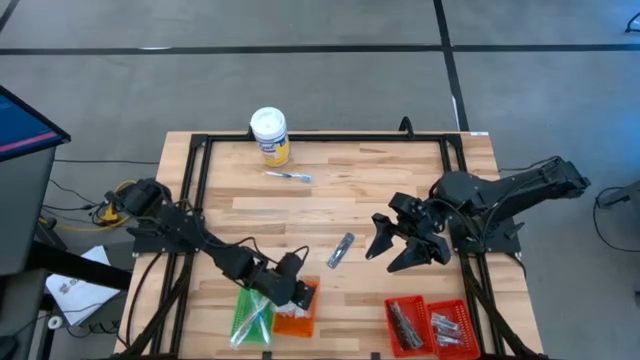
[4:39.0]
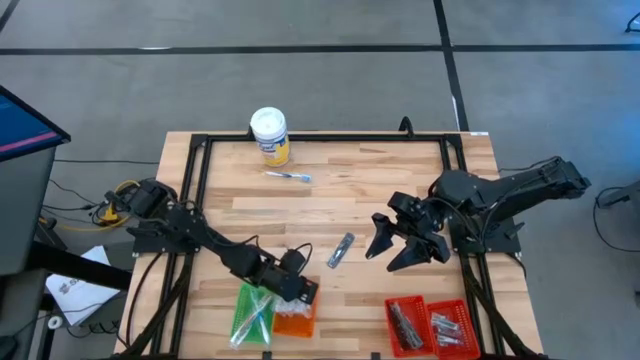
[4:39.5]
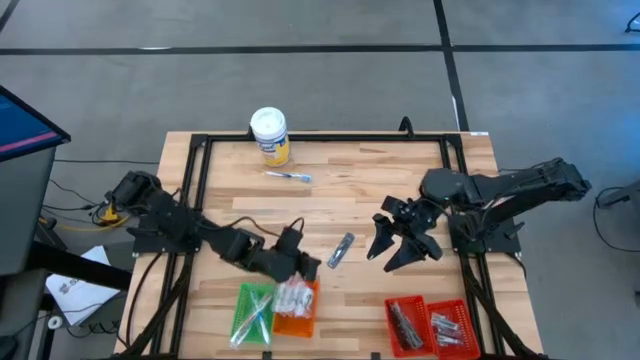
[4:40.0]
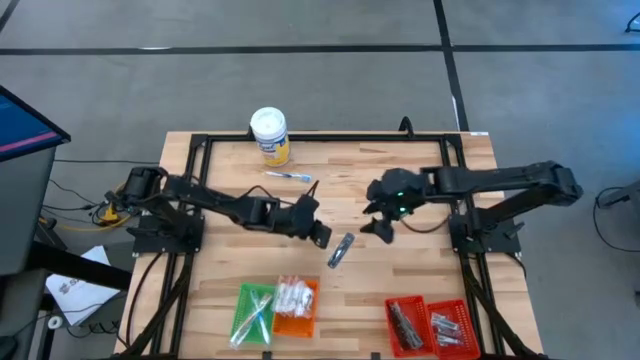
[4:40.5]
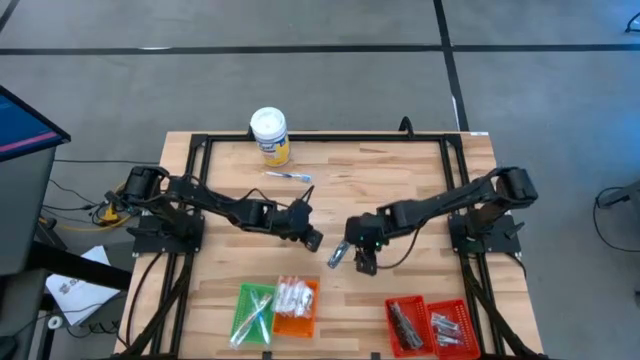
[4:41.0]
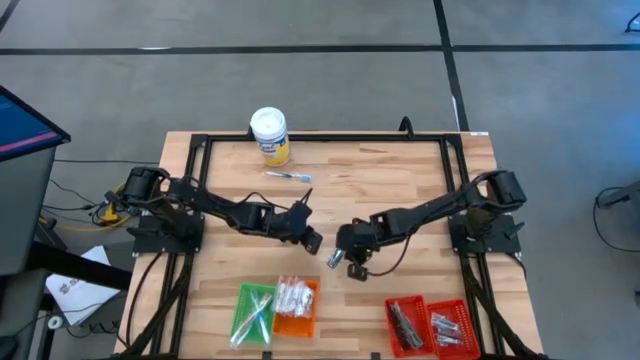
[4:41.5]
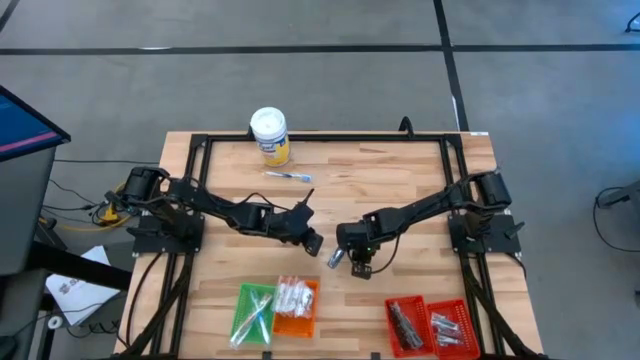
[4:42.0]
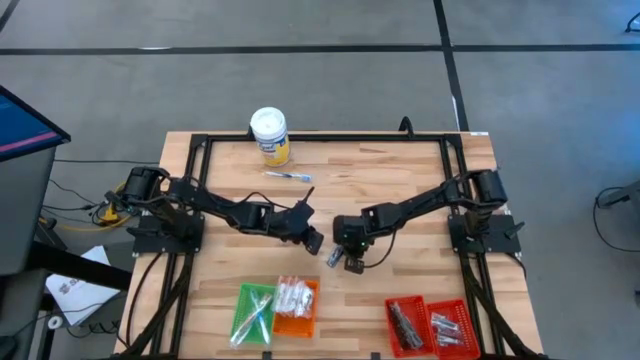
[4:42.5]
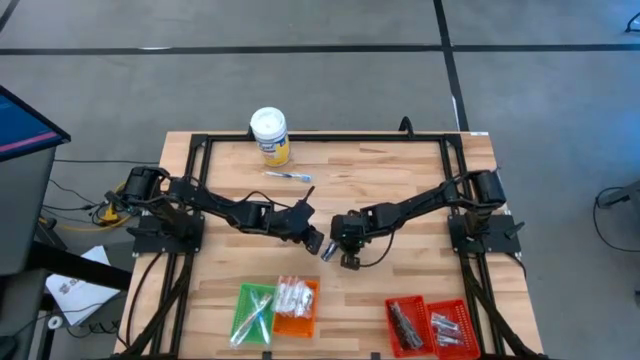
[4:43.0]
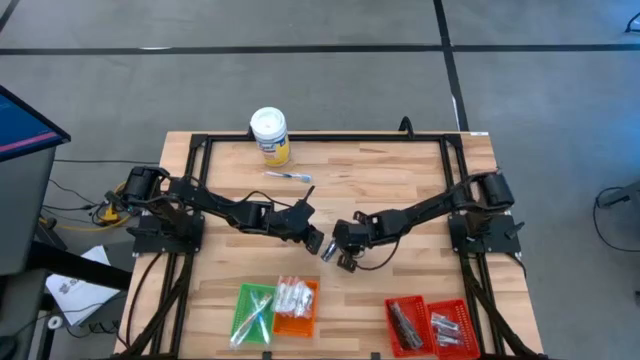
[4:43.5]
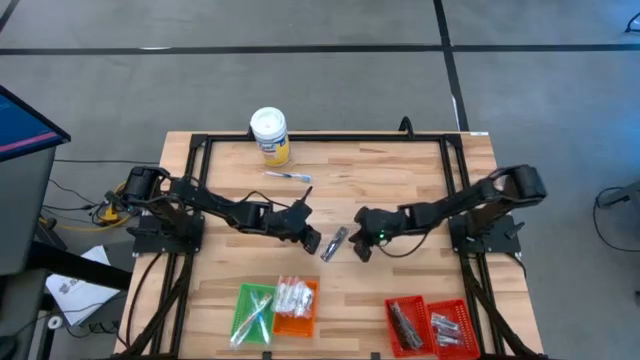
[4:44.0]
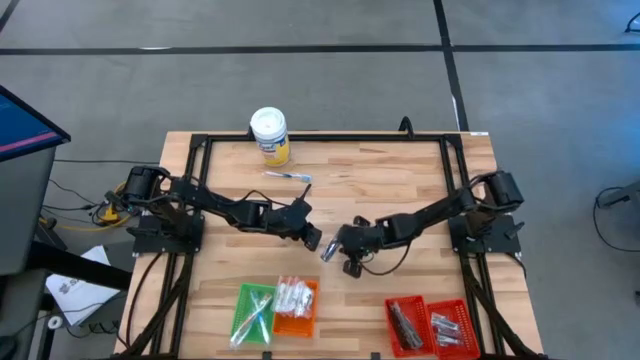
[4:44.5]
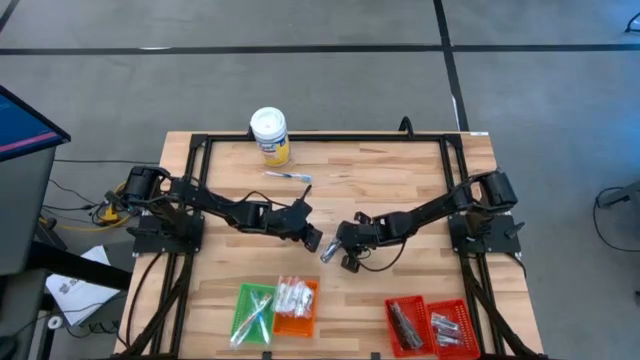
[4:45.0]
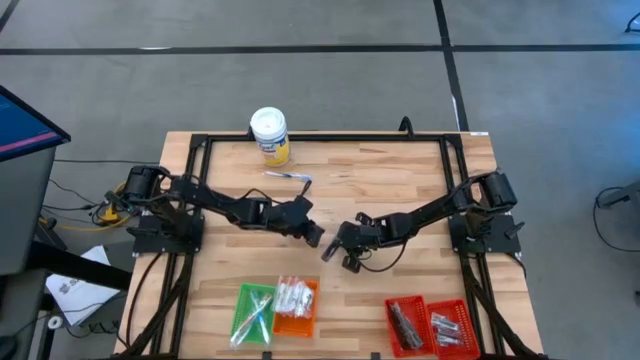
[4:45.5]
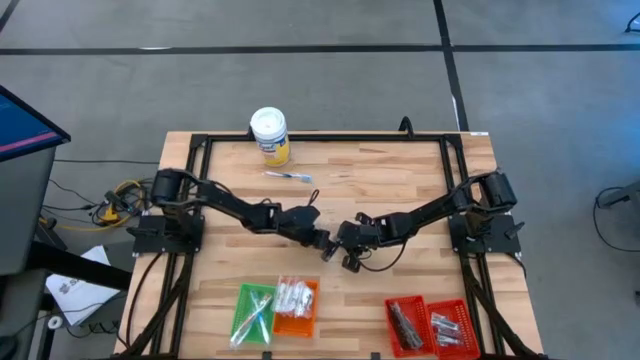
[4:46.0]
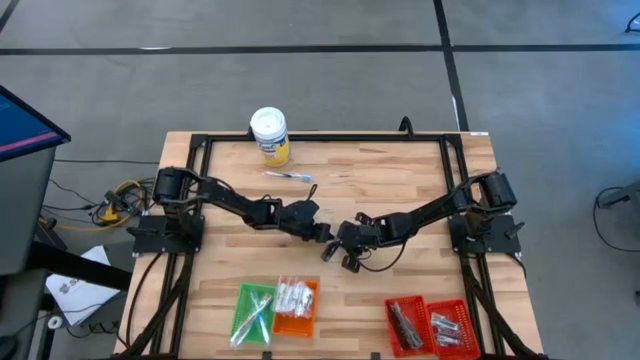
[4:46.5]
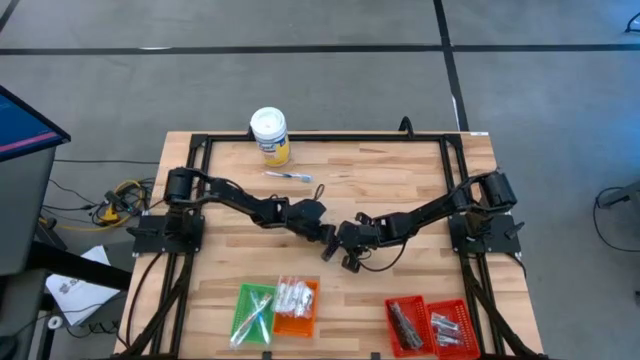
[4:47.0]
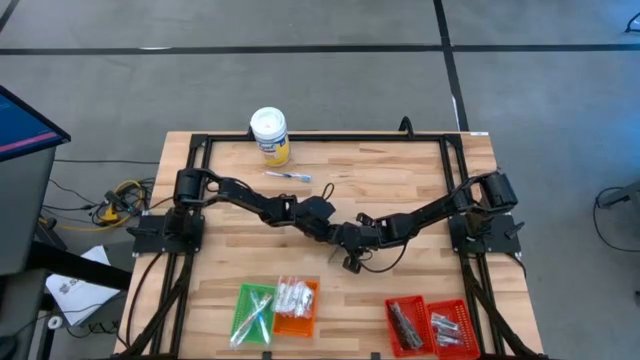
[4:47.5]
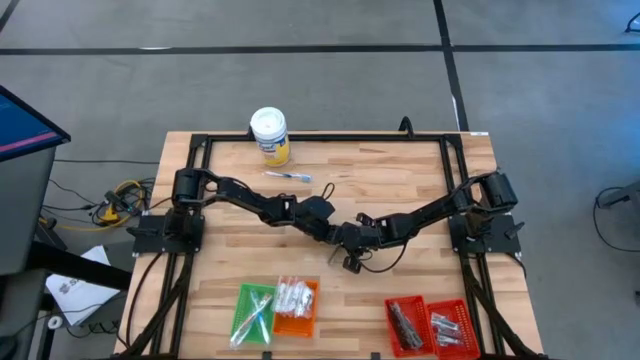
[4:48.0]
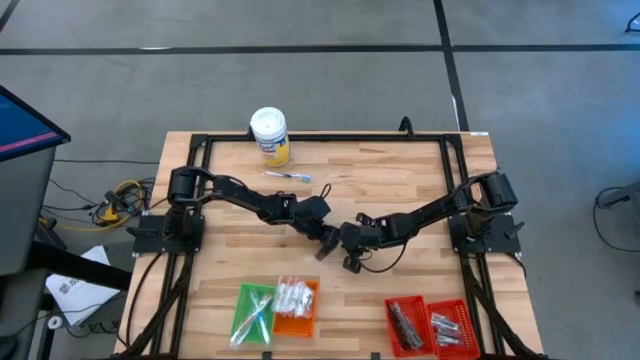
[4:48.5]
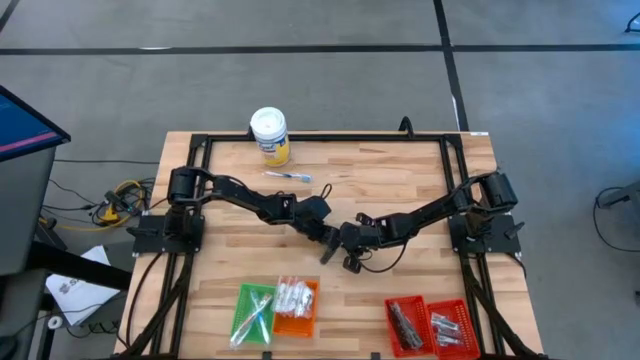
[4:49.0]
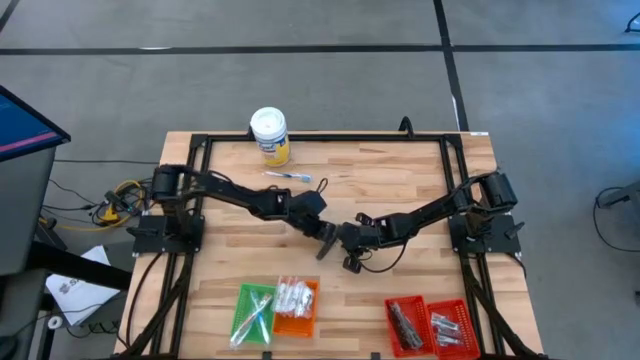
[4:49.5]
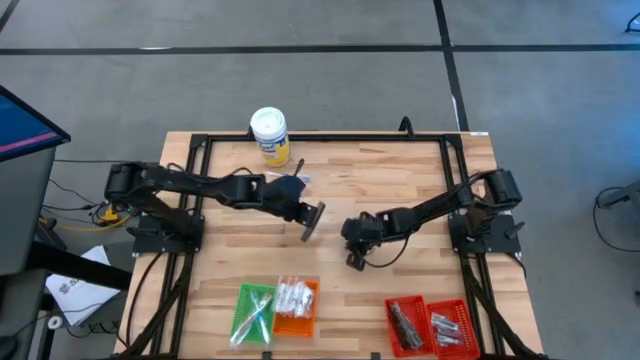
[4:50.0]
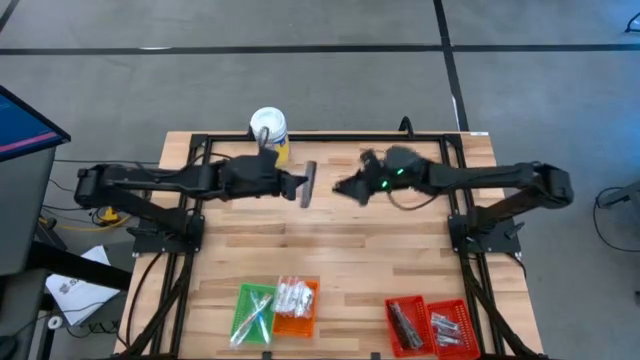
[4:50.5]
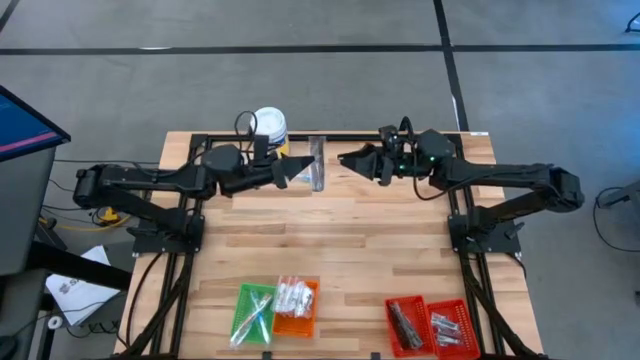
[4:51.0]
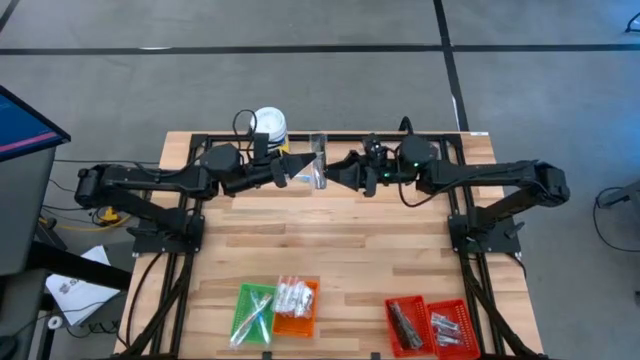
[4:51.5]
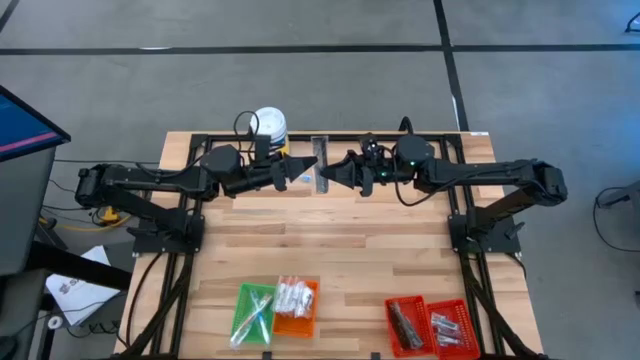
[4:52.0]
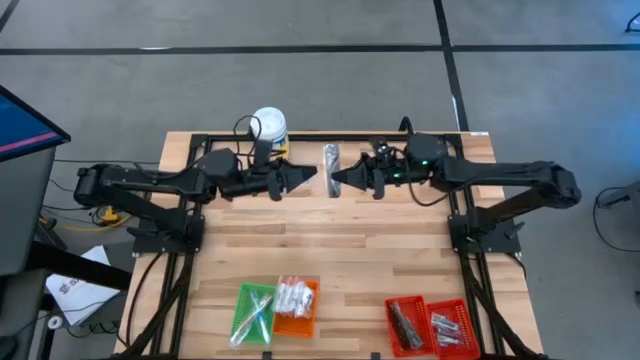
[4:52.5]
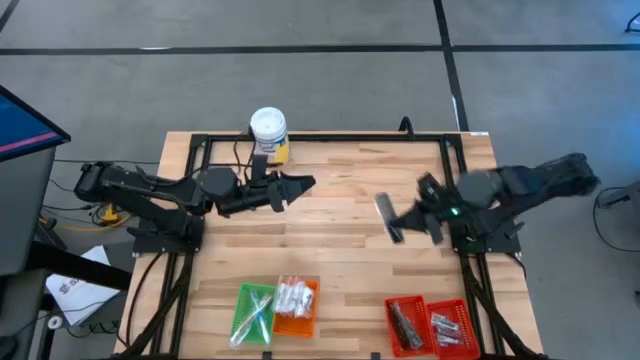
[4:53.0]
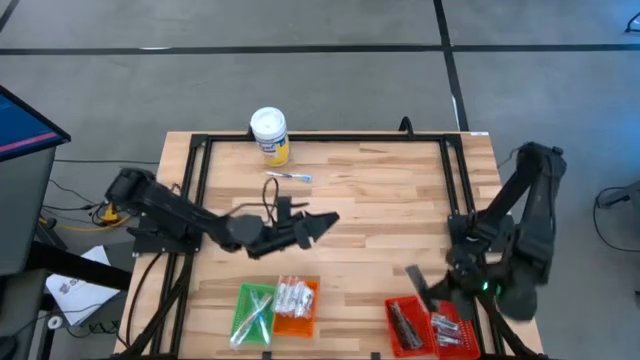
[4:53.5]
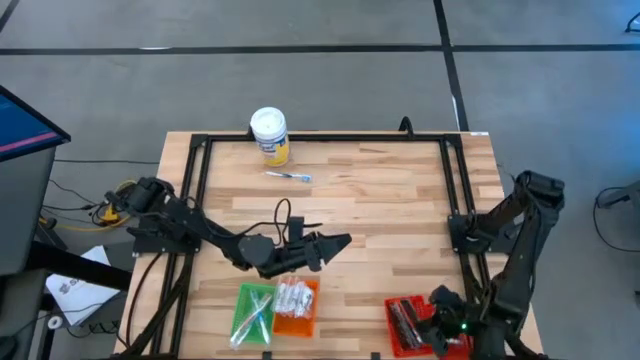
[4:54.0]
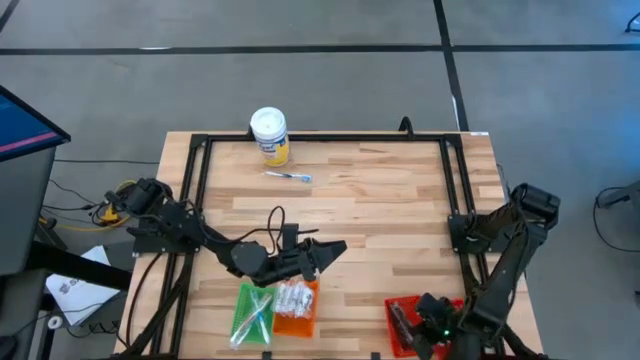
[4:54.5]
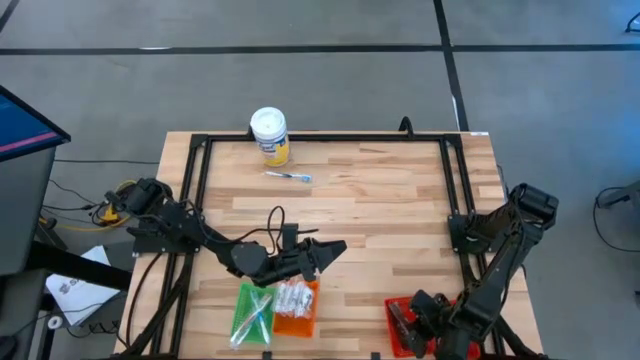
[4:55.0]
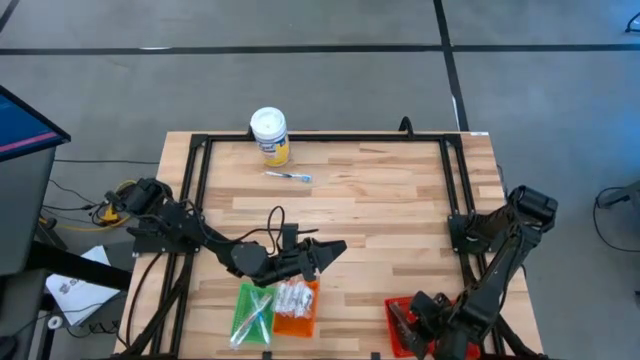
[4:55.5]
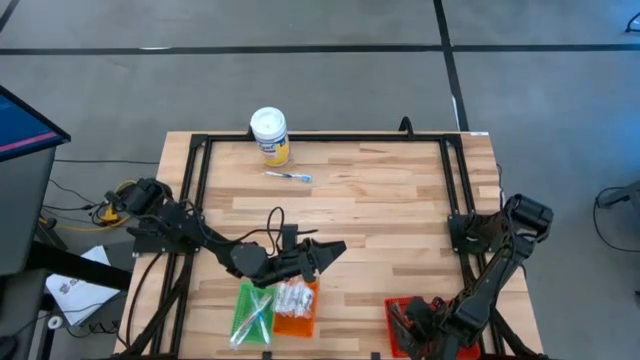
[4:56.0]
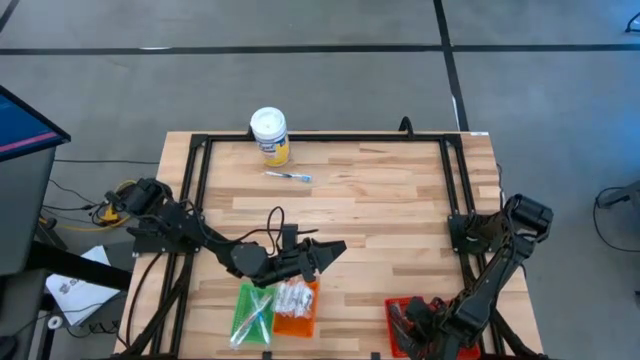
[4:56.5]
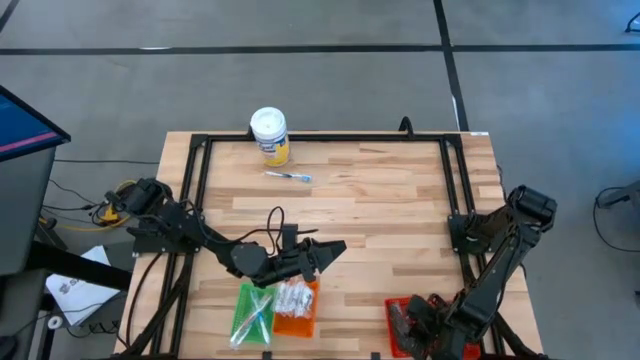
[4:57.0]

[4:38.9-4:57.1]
Task: Pick & Place Travel size toiletries
Put the black comb into the left red basket

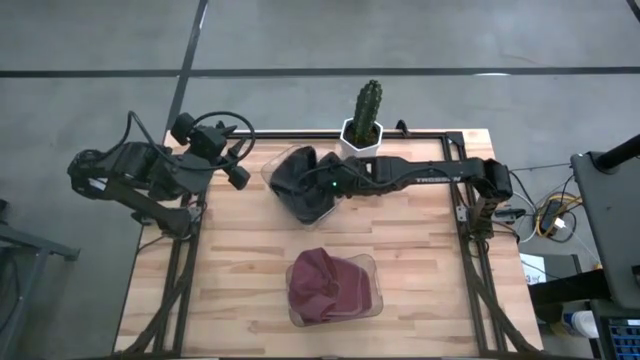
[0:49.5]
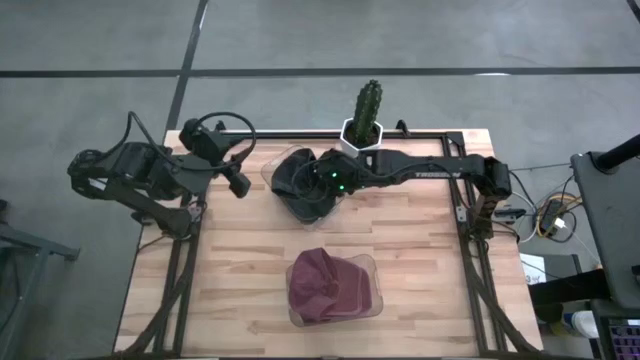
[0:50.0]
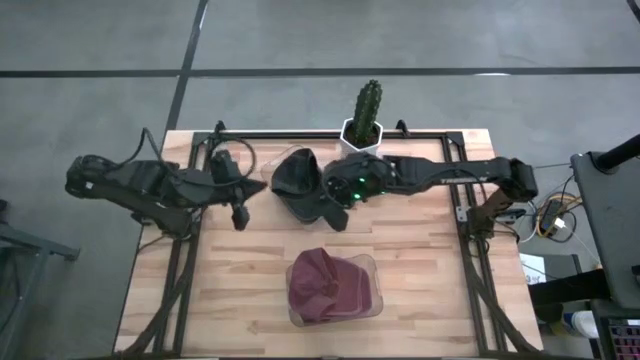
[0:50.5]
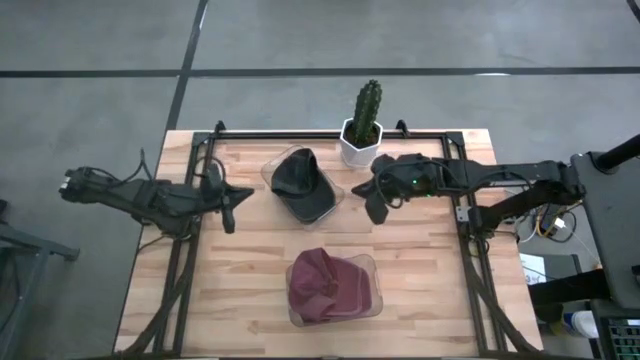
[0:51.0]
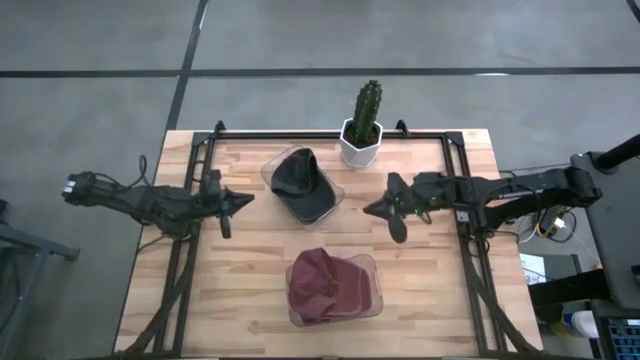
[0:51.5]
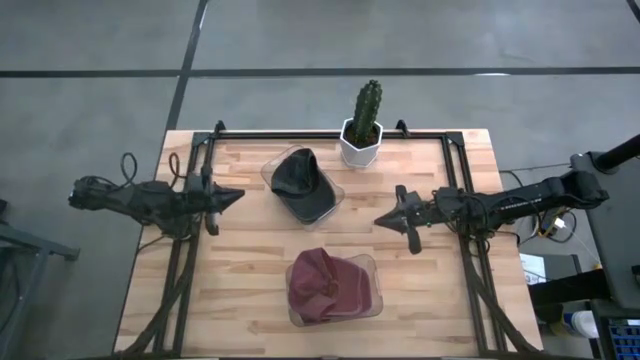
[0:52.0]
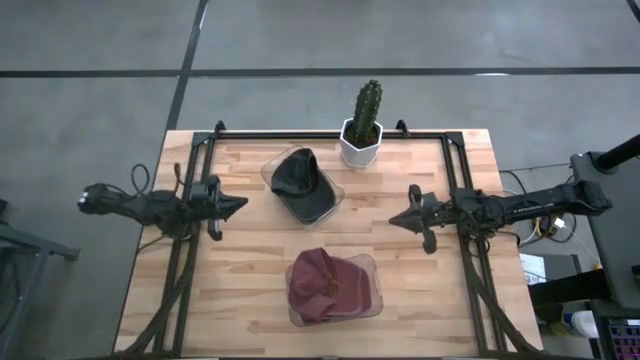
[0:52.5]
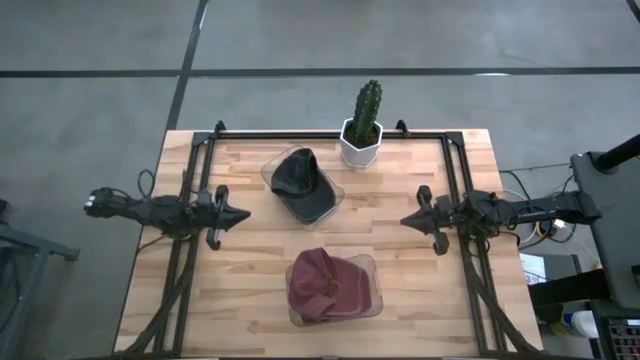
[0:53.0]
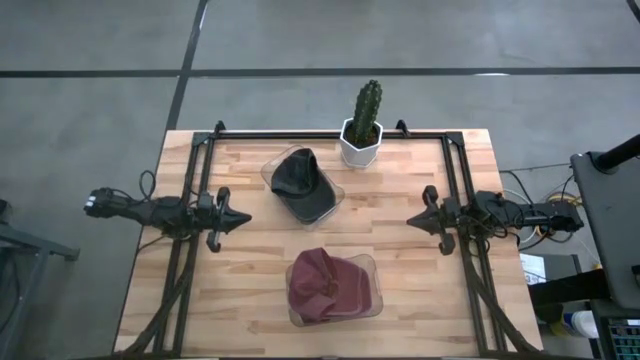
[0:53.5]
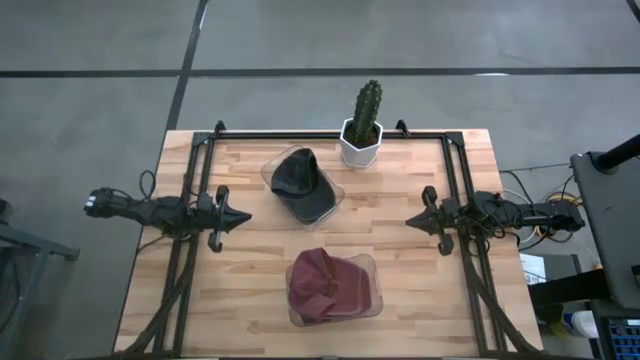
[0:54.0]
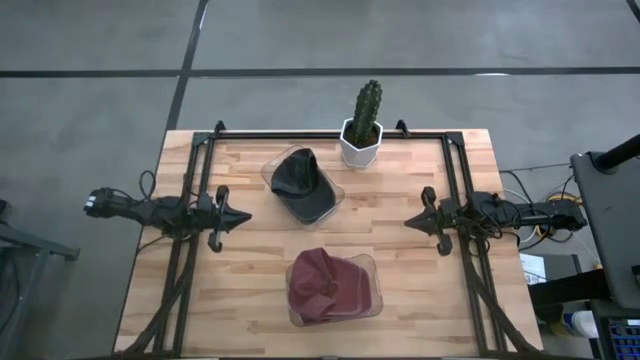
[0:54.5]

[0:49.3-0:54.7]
Task: Pick & Place hat
Return to Home Position
